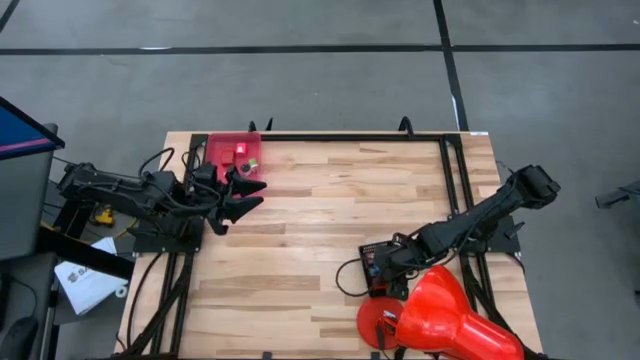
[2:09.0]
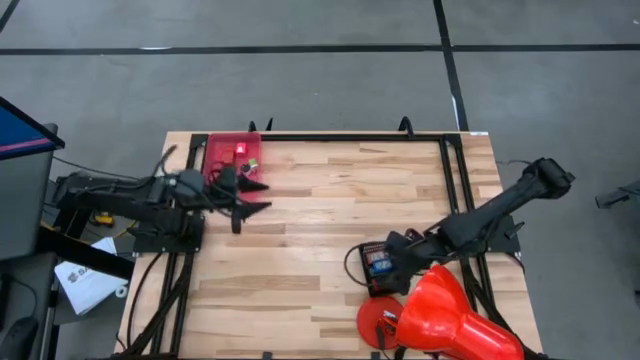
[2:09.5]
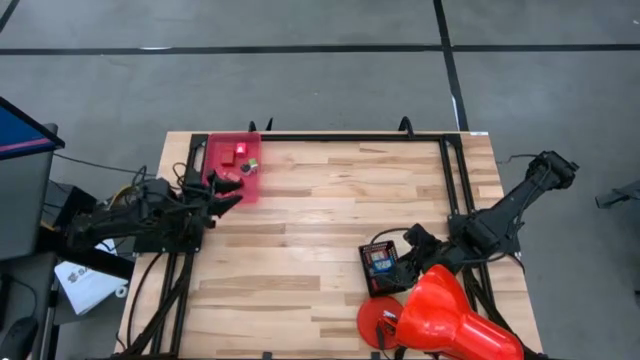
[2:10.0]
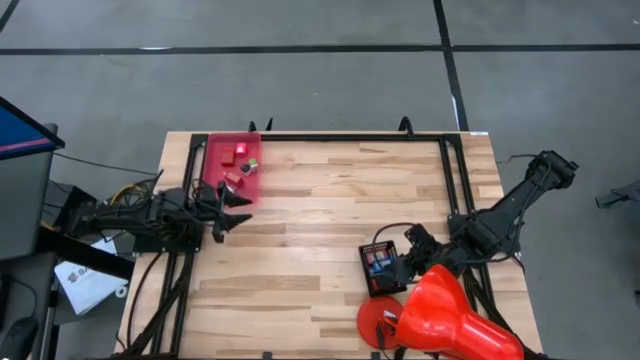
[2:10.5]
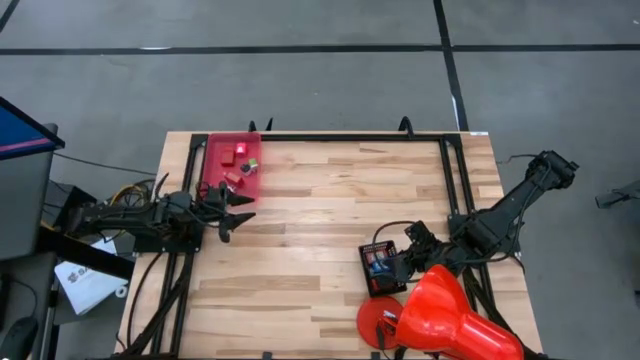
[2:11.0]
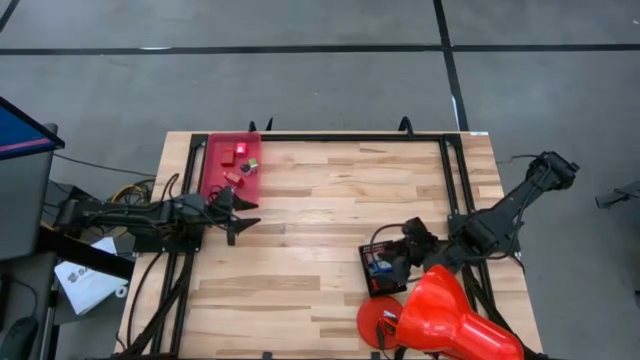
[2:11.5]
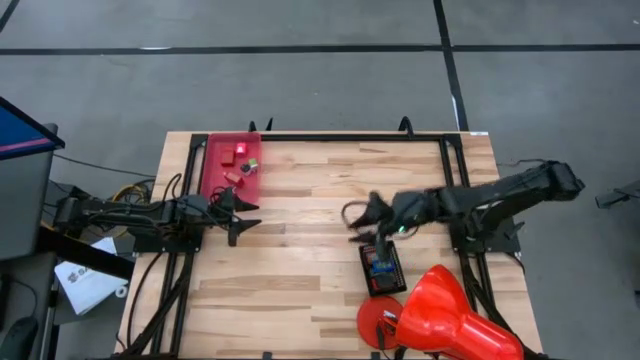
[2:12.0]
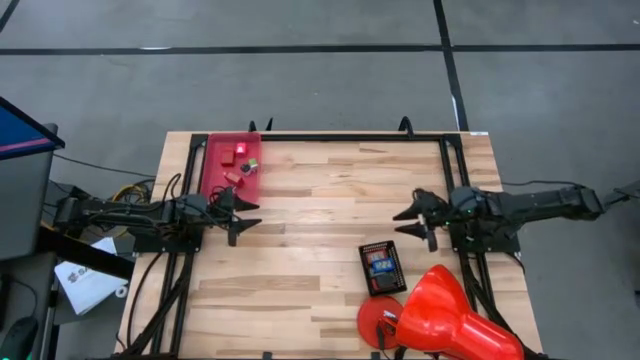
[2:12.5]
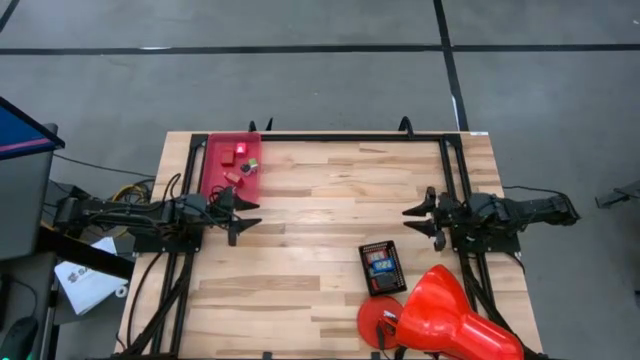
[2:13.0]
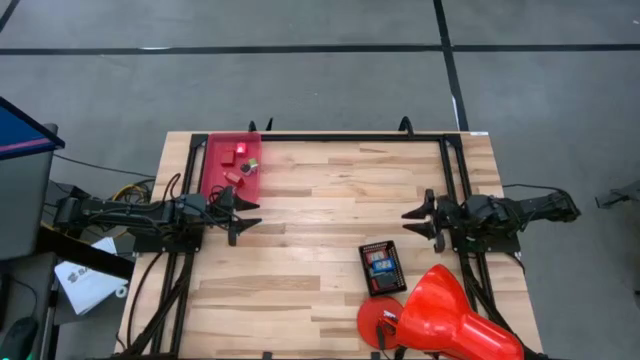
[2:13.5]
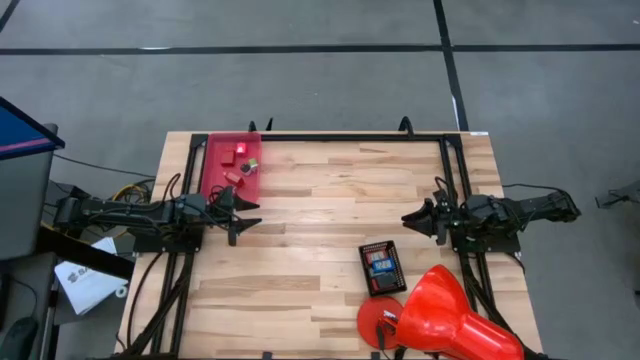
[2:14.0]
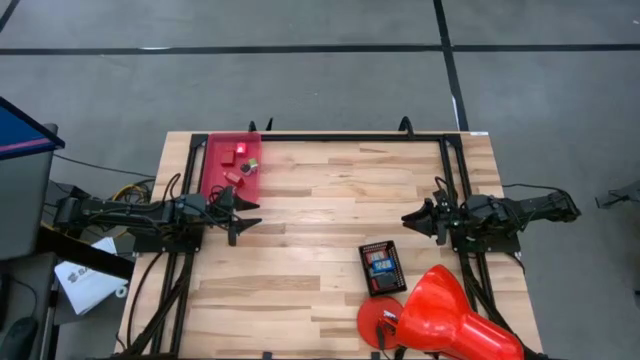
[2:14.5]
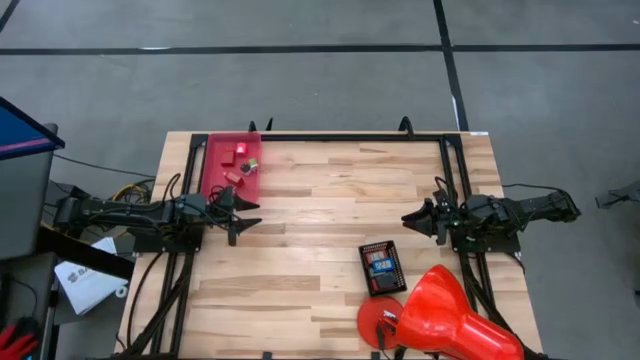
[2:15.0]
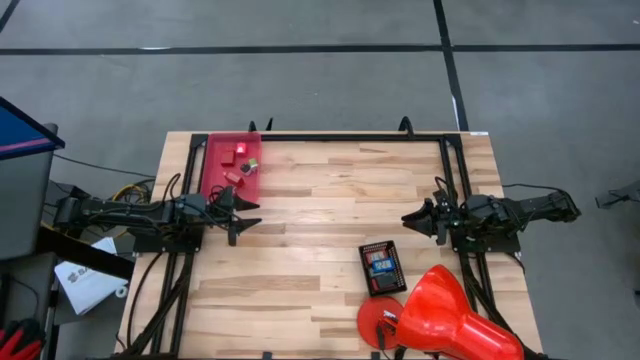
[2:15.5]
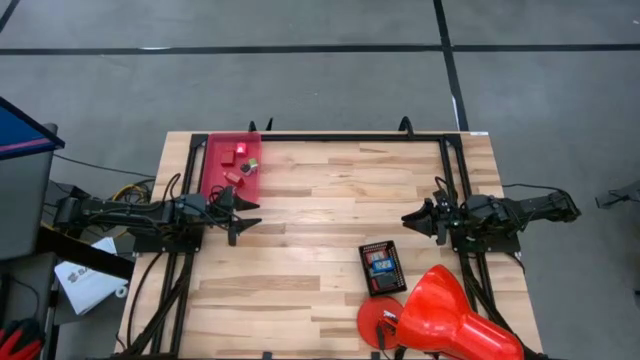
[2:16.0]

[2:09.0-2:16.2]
Task: Pick & Place Office items
Return to Home Position

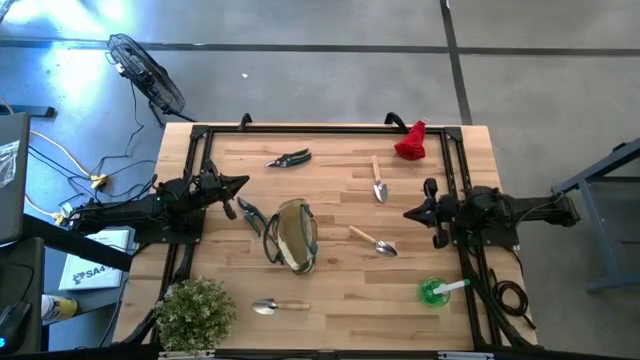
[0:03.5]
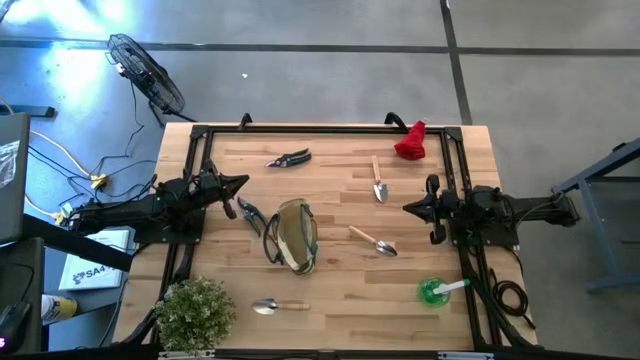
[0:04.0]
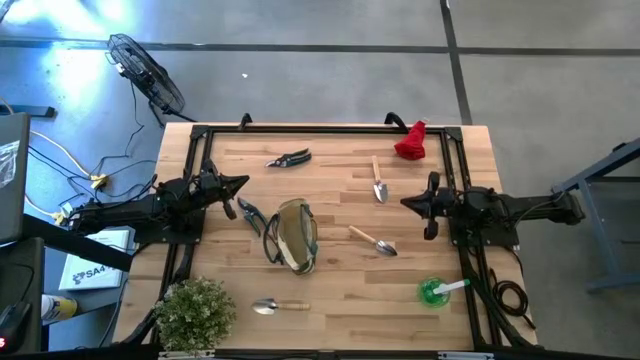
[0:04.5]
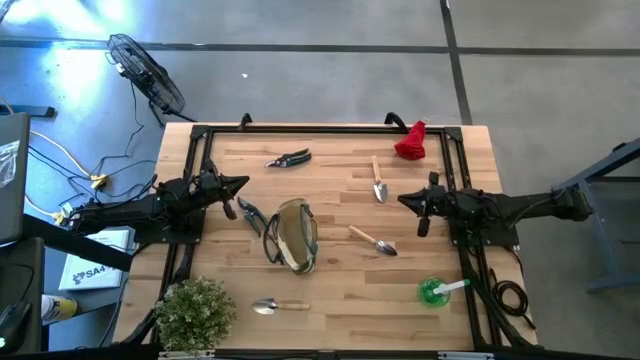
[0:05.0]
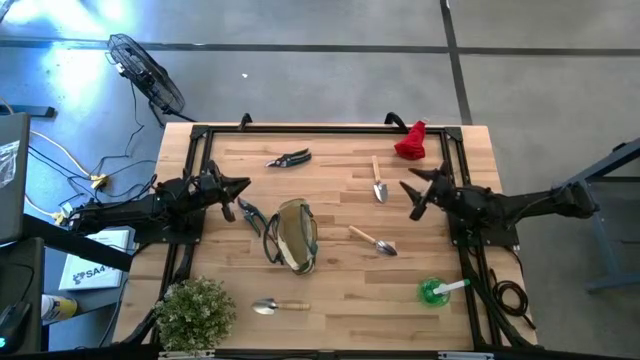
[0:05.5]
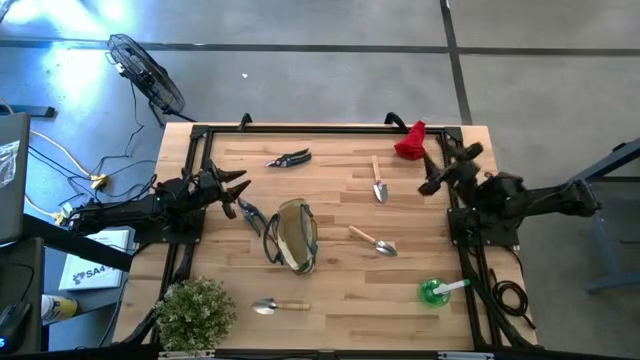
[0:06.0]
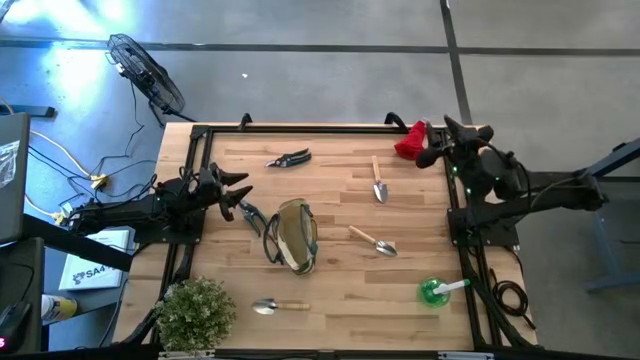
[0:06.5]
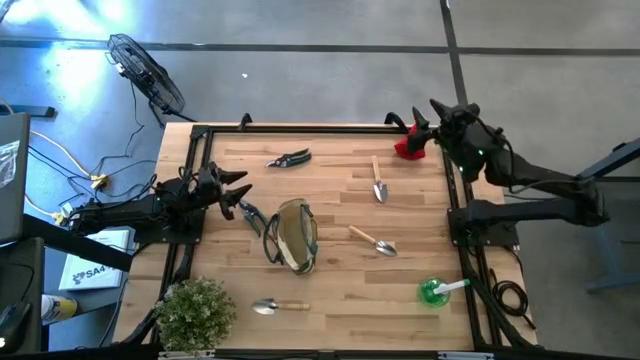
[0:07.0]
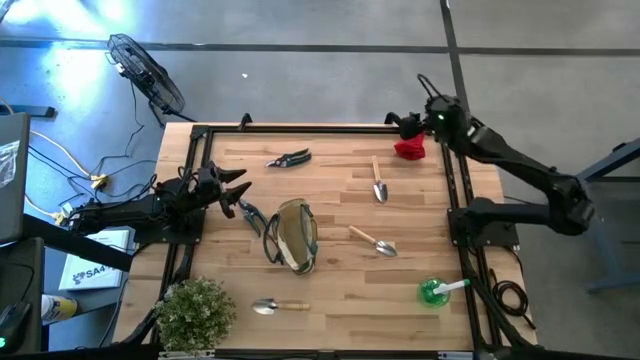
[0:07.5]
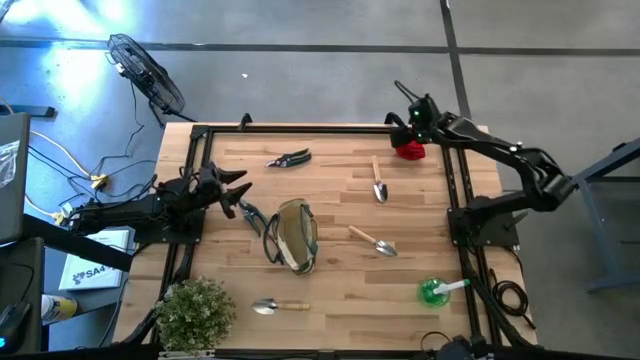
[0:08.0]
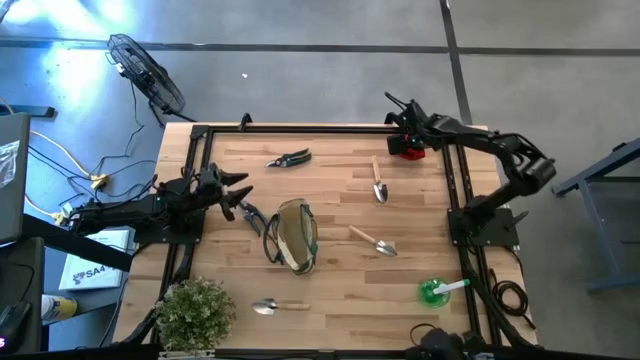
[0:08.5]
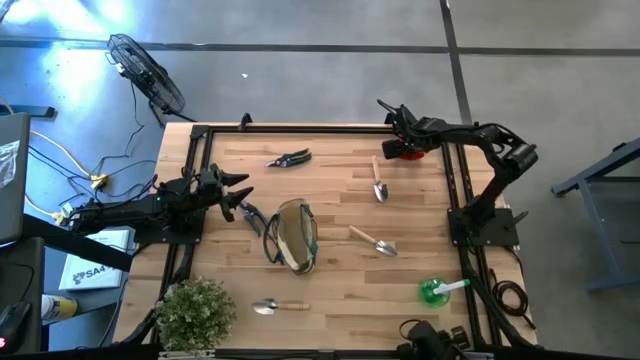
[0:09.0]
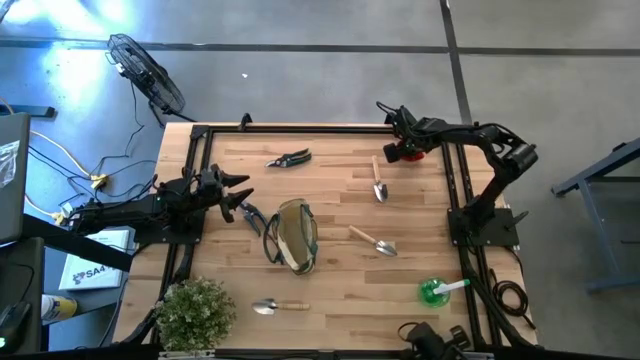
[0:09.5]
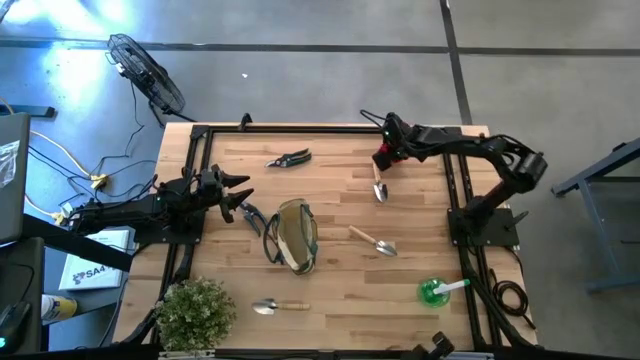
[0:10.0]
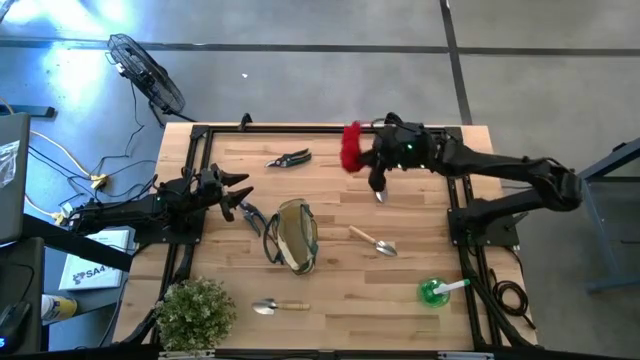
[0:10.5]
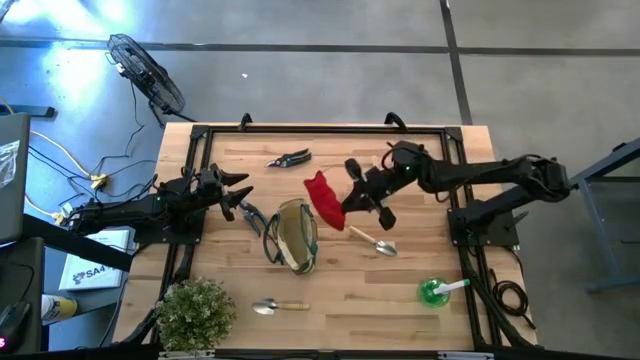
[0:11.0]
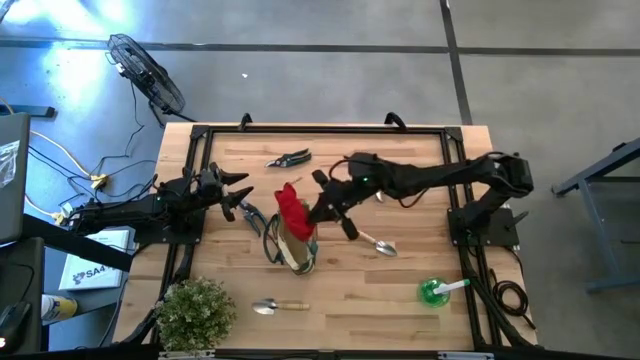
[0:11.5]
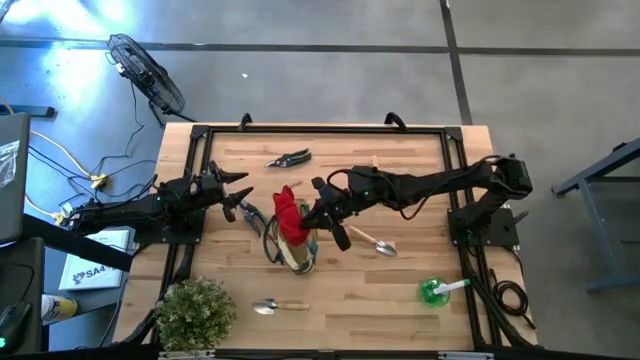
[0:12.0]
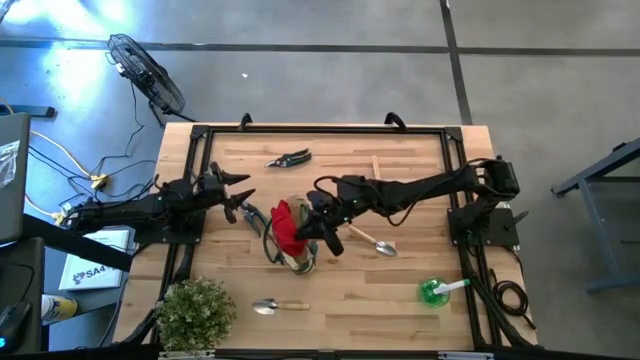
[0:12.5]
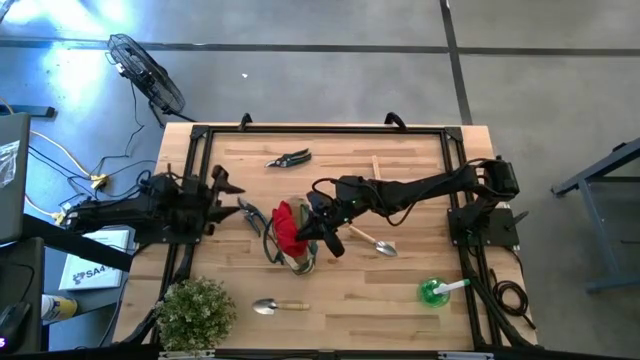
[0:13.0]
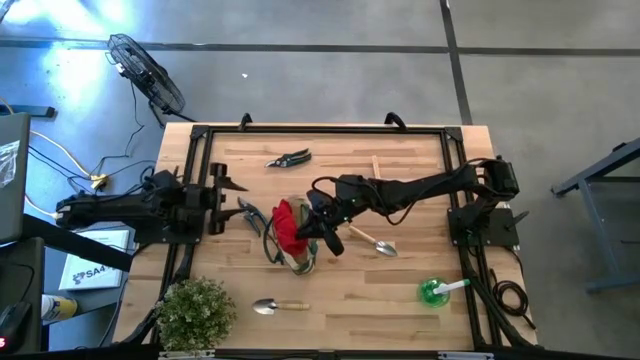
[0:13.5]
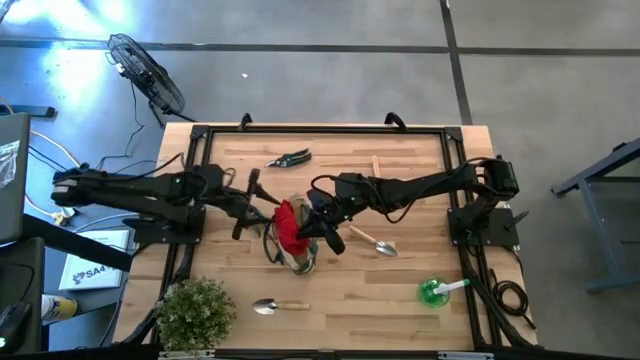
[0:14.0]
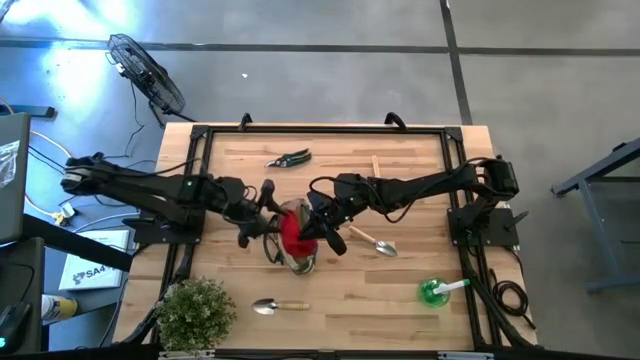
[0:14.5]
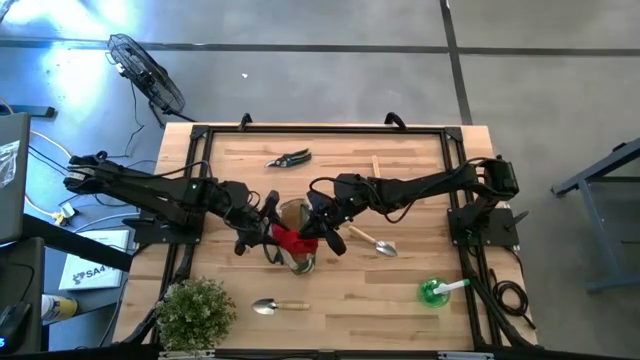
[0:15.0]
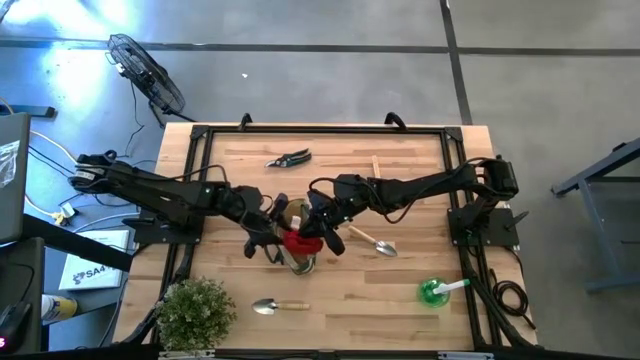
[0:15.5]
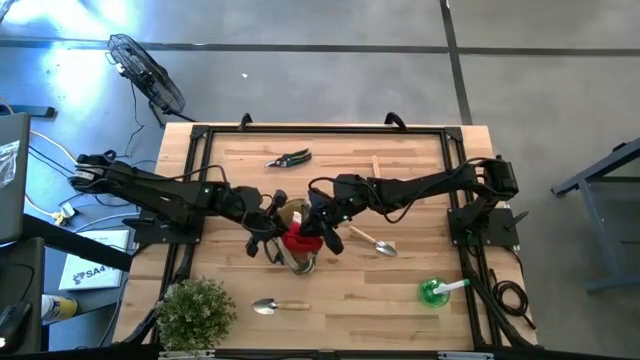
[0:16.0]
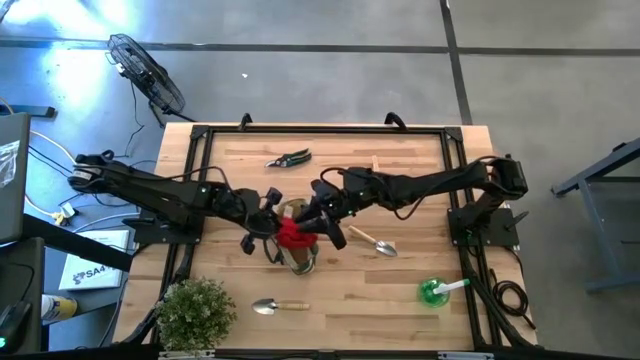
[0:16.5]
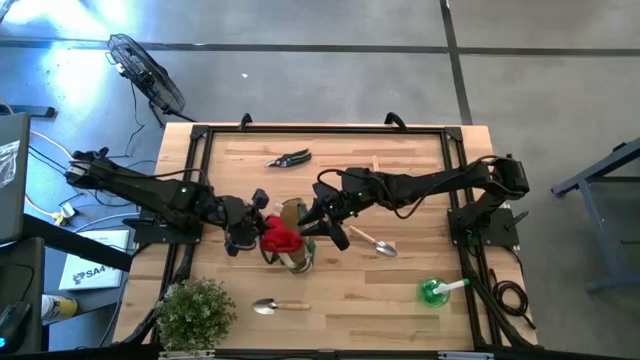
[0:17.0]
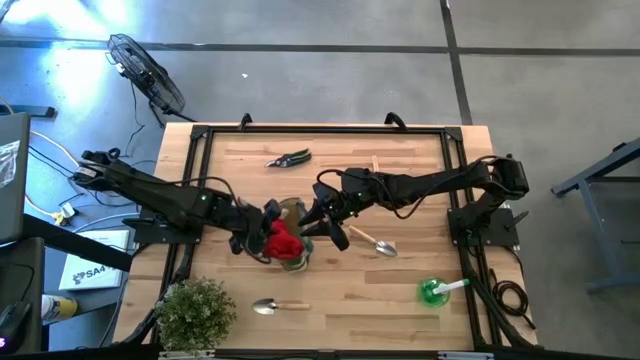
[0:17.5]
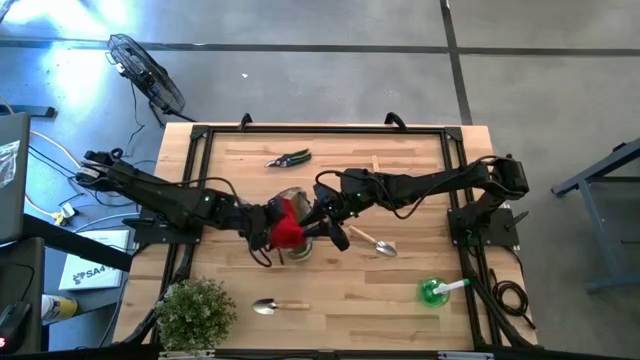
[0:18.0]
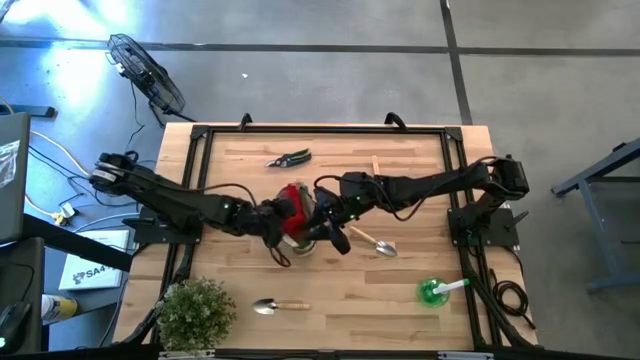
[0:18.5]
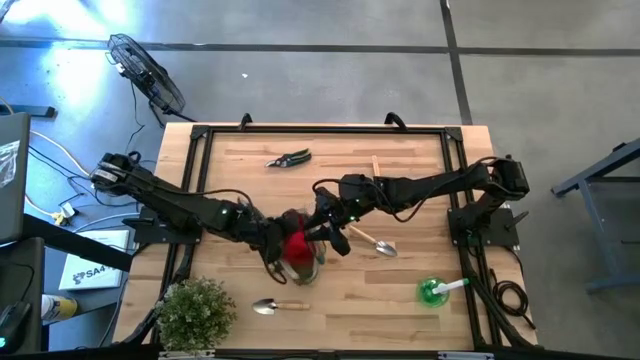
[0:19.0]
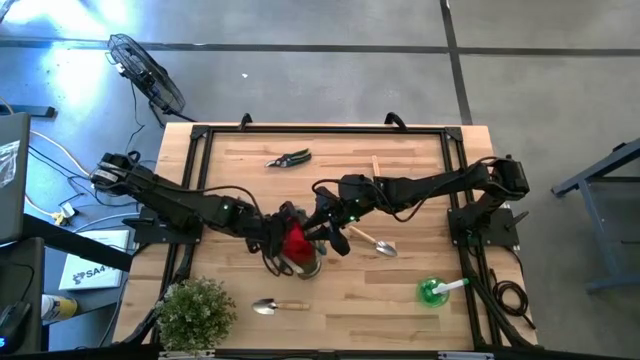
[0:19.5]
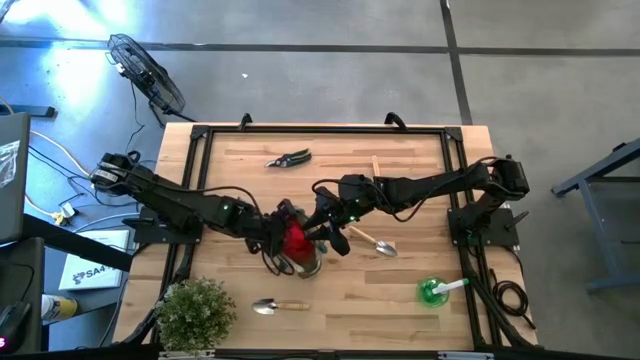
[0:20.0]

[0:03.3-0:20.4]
Task: Pick & Place Garden tools in Gardening bag
Put the glove into the gardening bag
